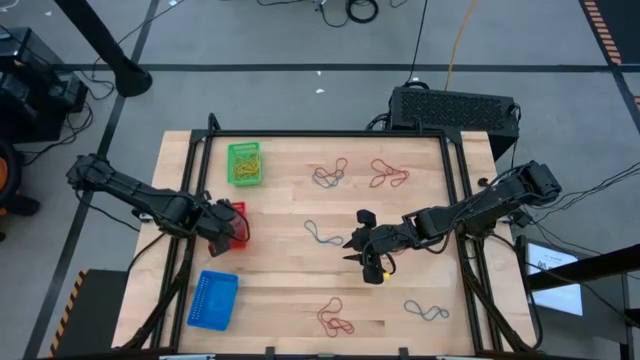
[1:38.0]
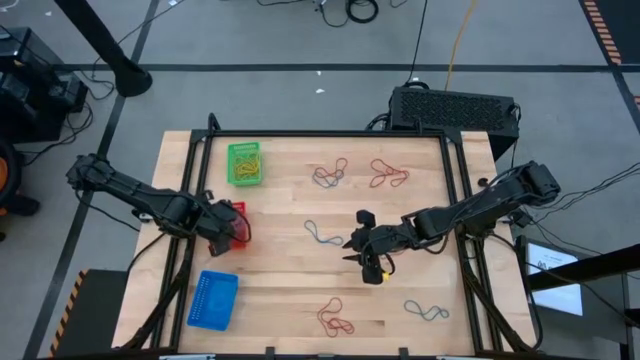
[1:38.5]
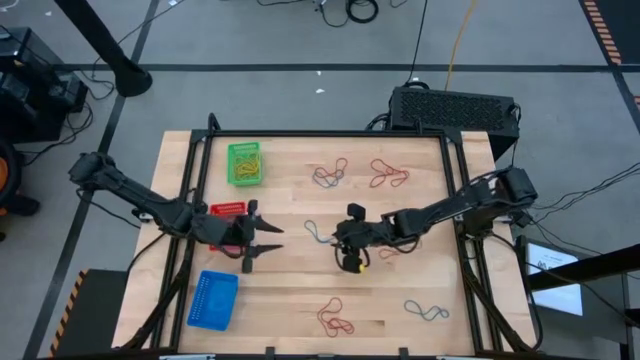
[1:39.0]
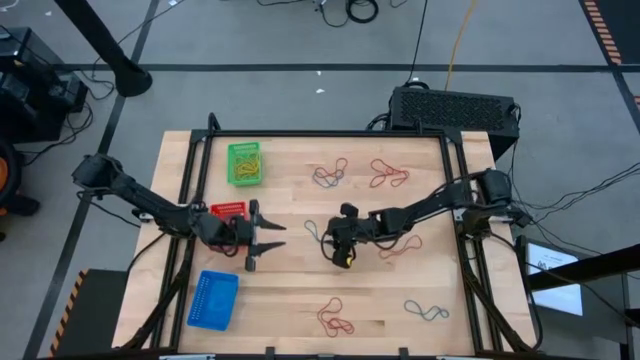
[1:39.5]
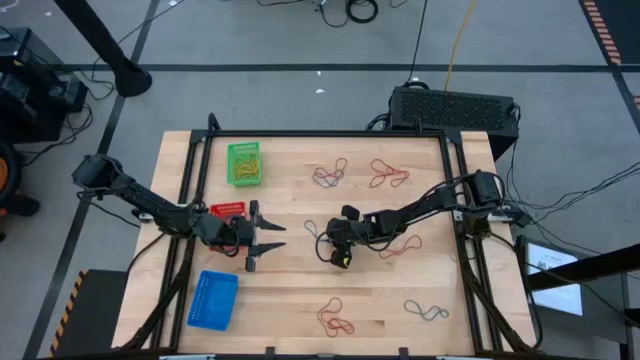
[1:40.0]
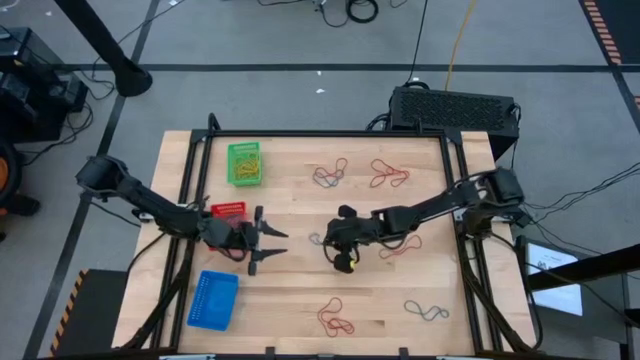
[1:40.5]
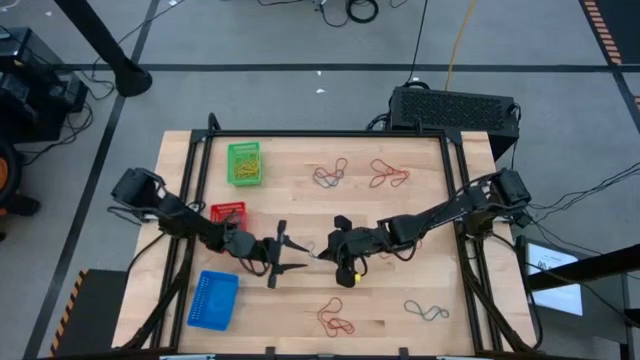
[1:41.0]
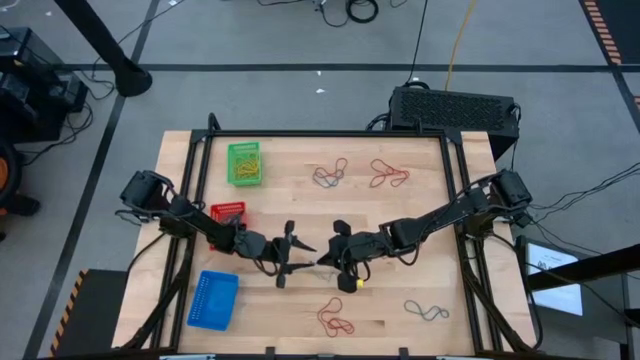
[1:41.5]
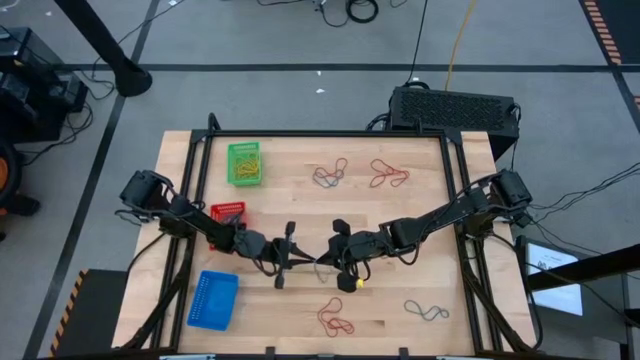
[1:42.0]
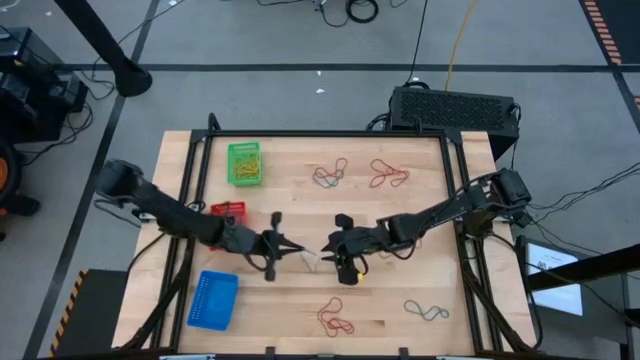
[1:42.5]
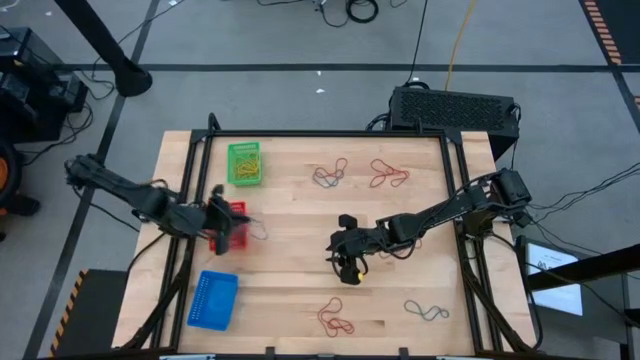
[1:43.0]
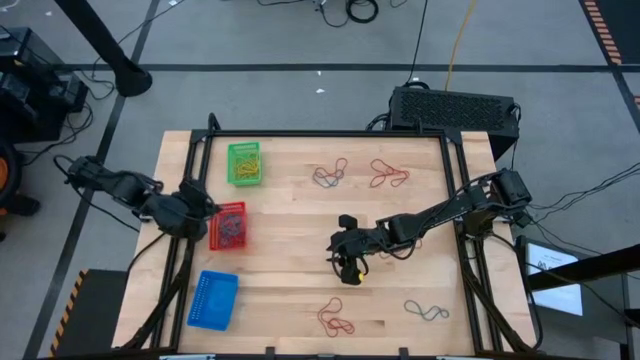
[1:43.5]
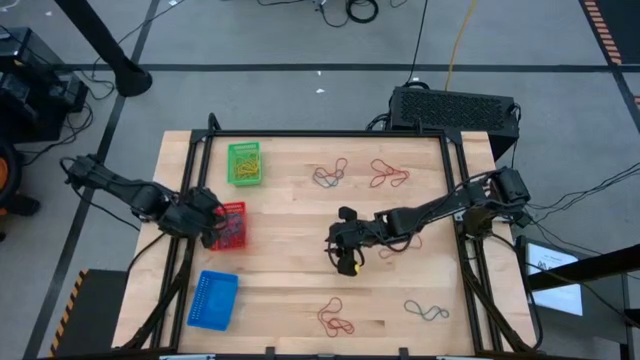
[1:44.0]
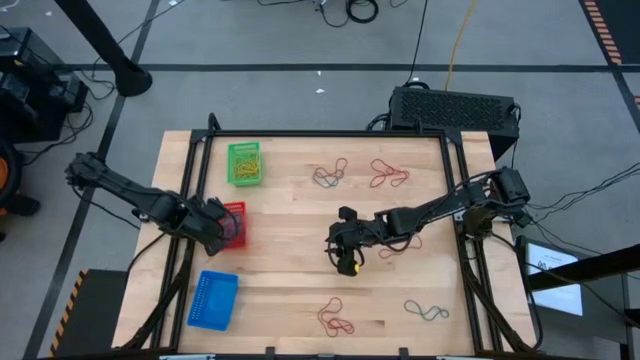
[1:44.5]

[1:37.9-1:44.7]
Task: Sort rubber bands into baskets
Put the blue rubber band into the red bin

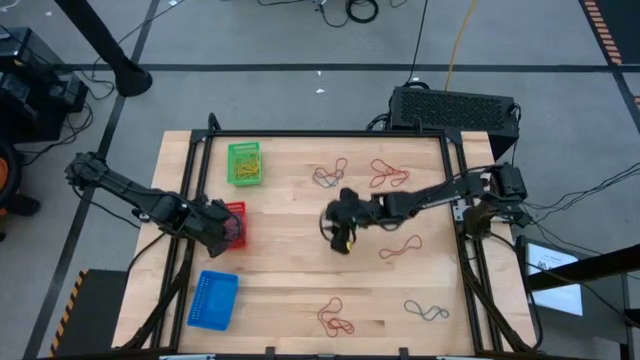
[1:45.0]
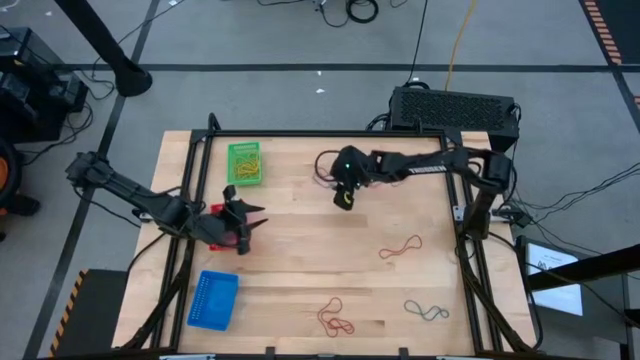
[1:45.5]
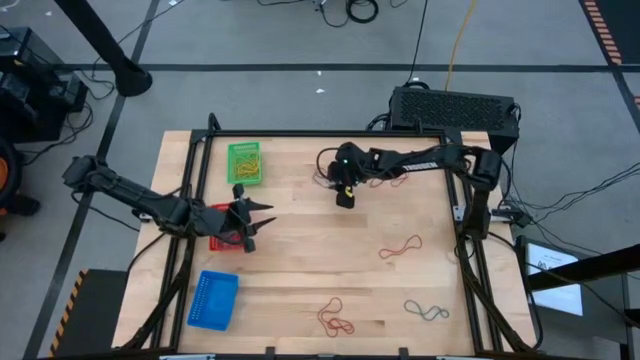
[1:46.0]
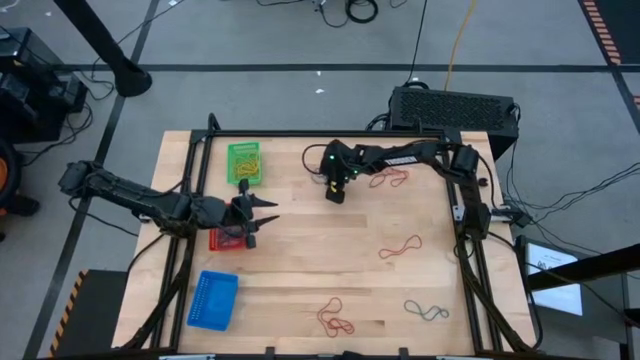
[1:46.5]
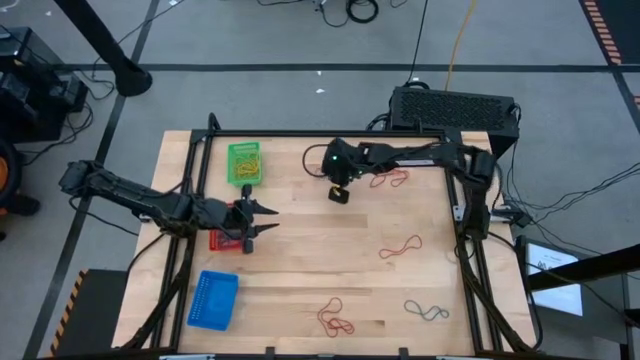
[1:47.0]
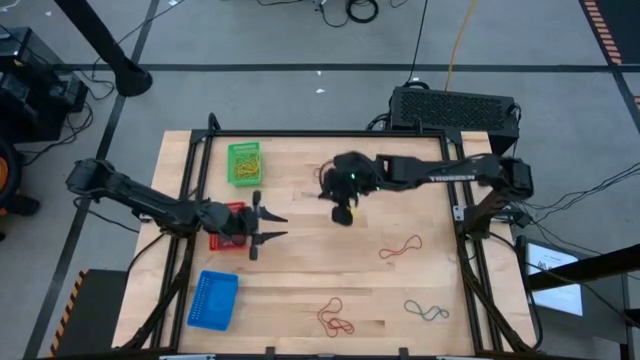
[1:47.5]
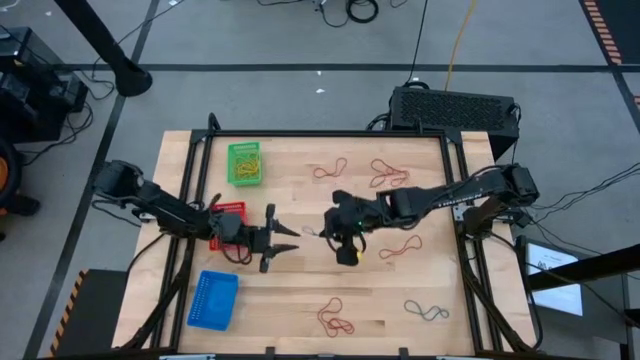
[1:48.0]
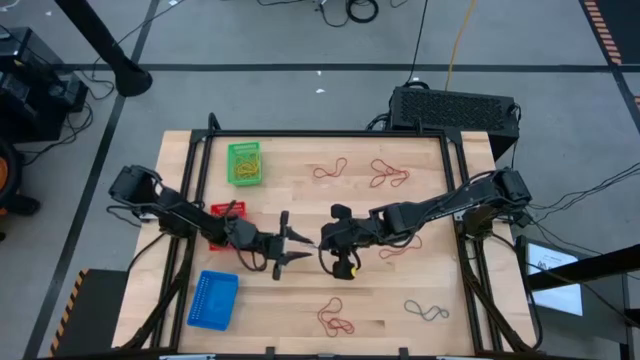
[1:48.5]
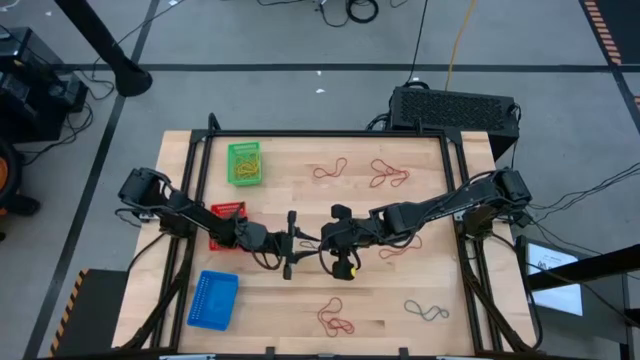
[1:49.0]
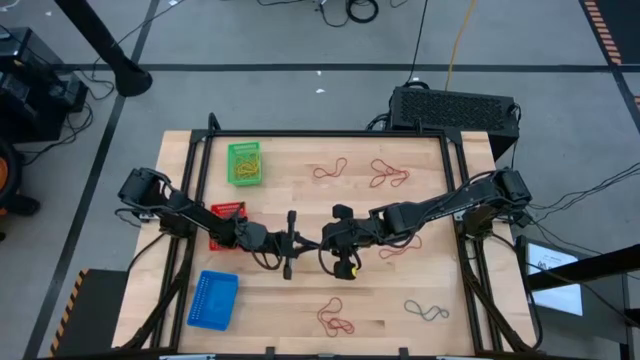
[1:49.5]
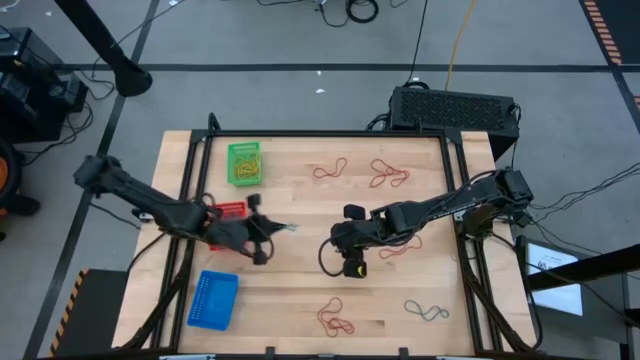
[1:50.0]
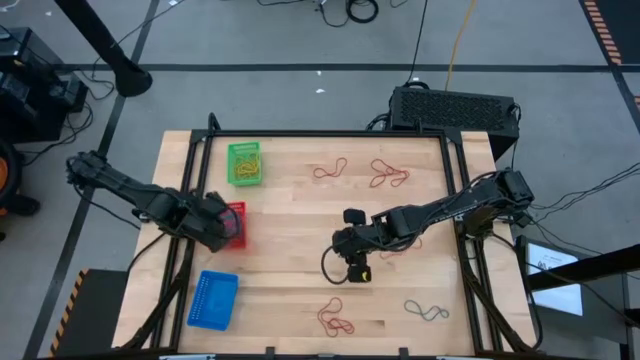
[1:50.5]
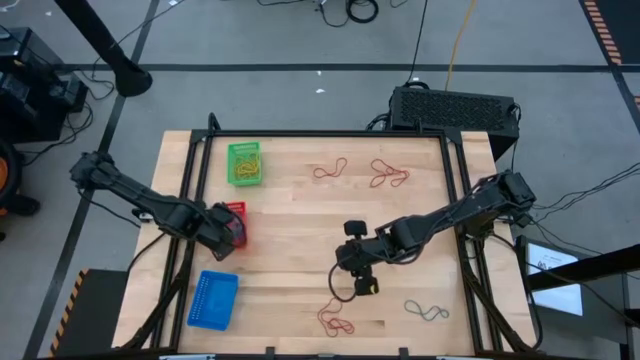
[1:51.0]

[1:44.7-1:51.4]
Put the blue rubber band into the red bin

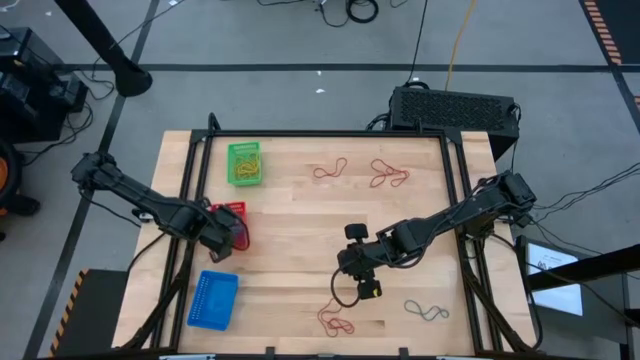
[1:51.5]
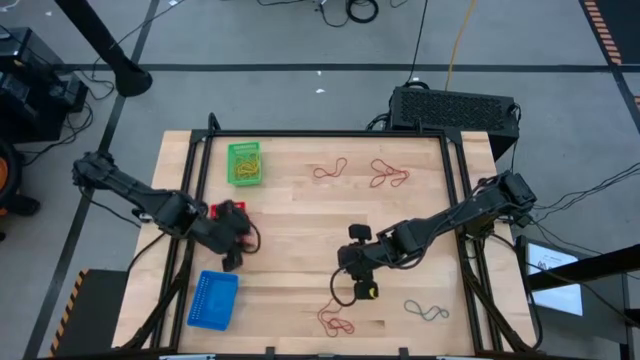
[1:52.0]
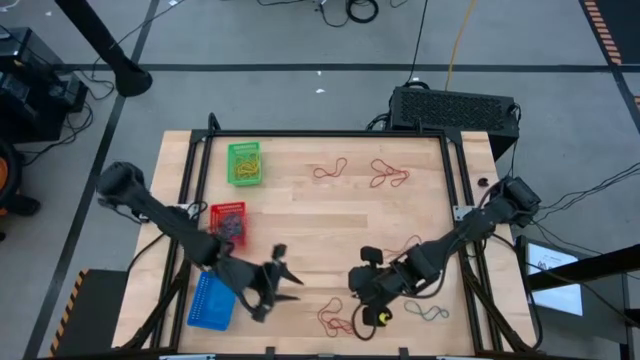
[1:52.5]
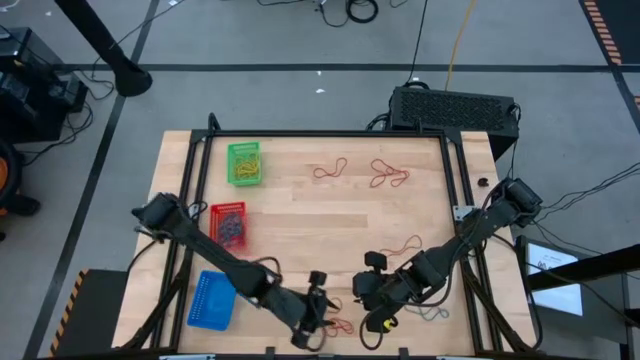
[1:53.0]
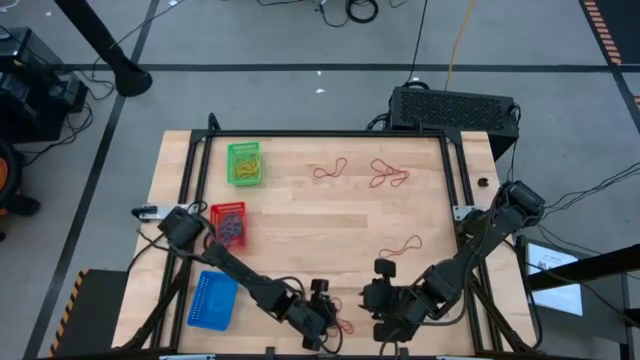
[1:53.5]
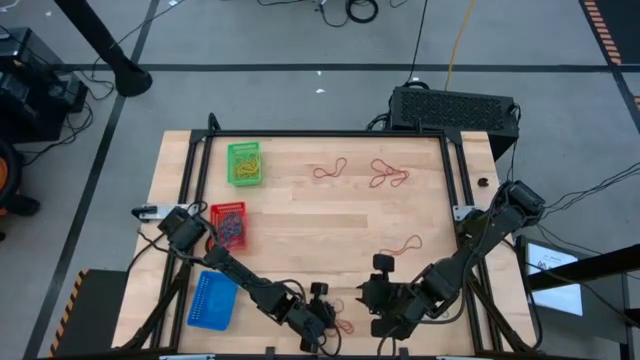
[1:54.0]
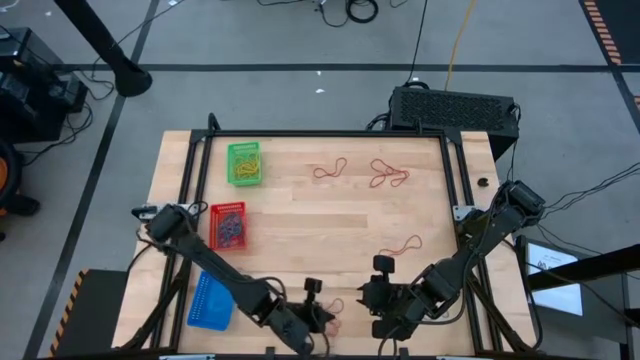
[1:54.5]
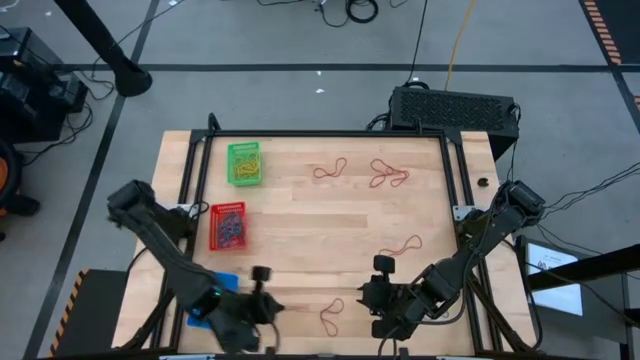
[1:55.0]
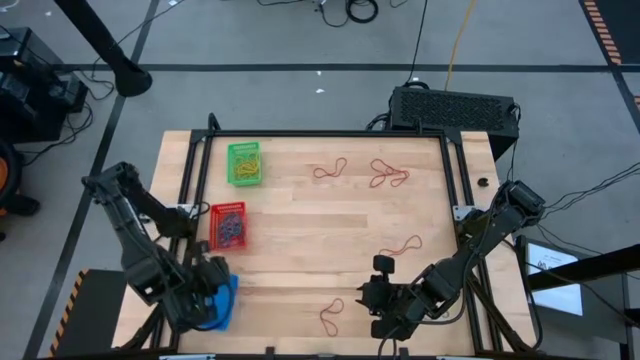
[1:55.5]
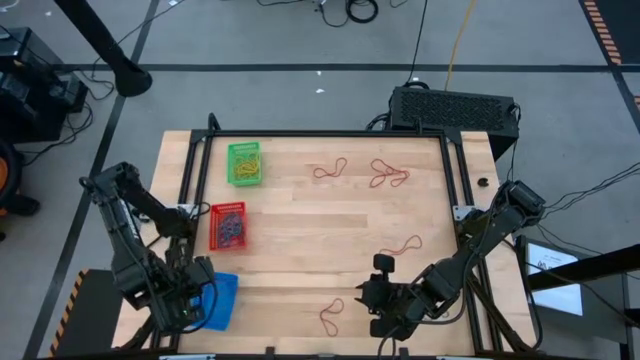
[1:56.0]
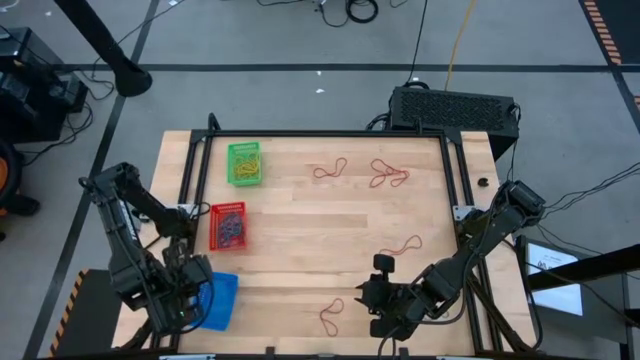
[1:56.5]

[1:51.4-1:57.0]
Put the red rubber band into the blue bin

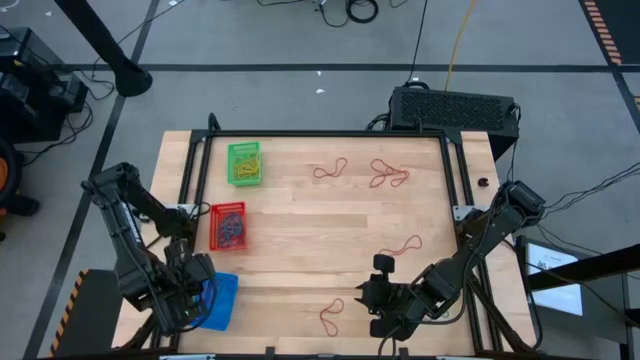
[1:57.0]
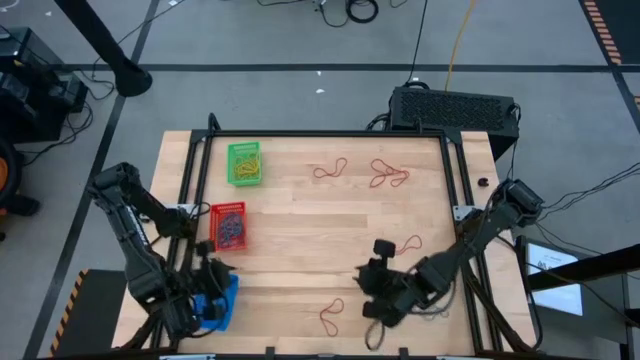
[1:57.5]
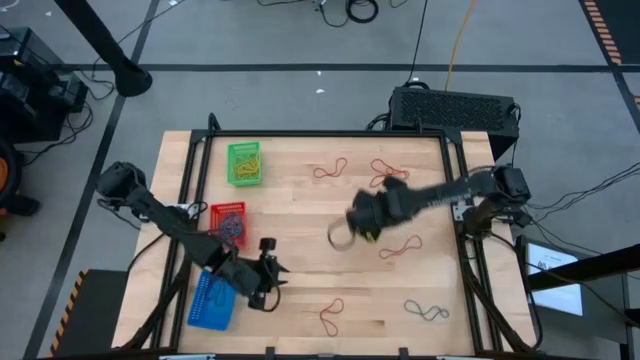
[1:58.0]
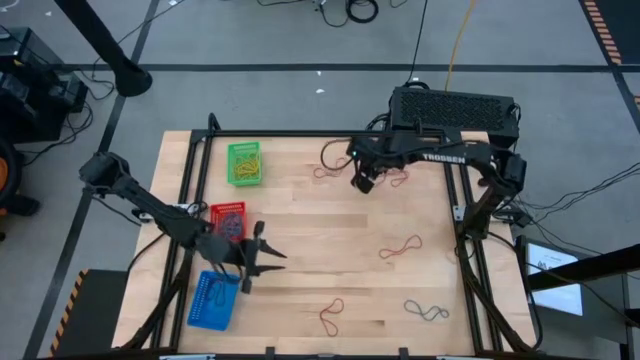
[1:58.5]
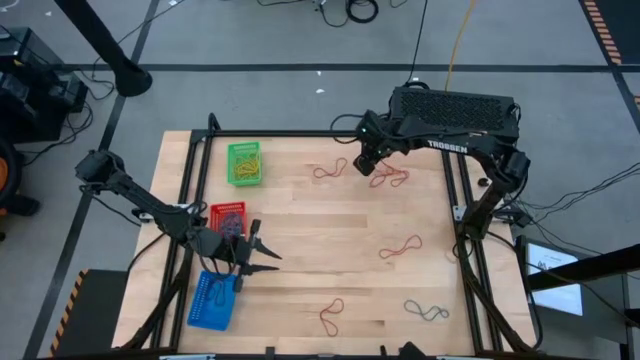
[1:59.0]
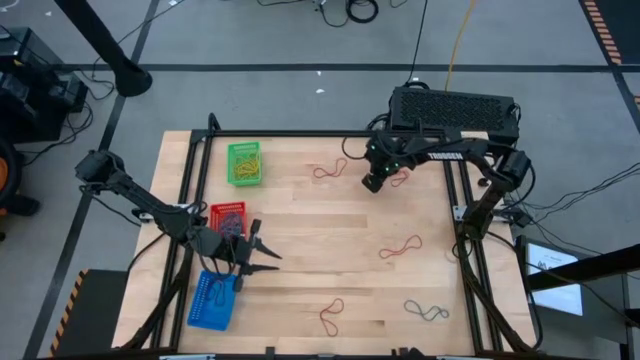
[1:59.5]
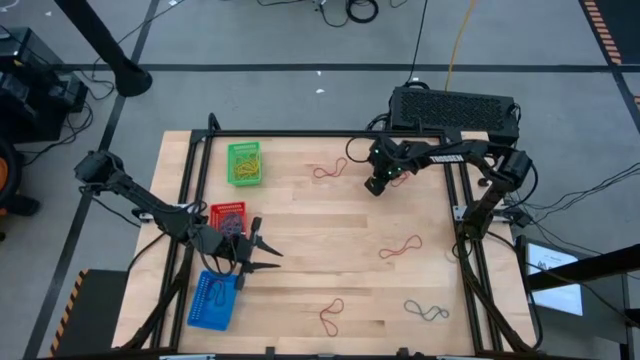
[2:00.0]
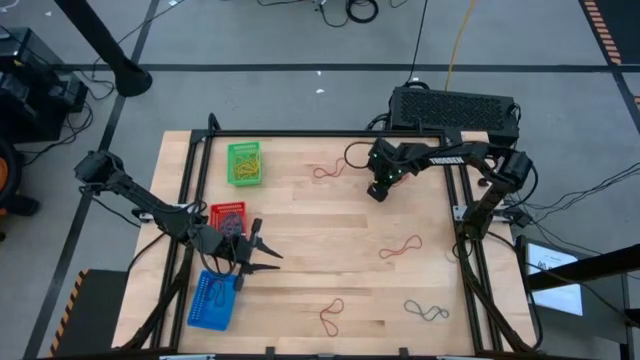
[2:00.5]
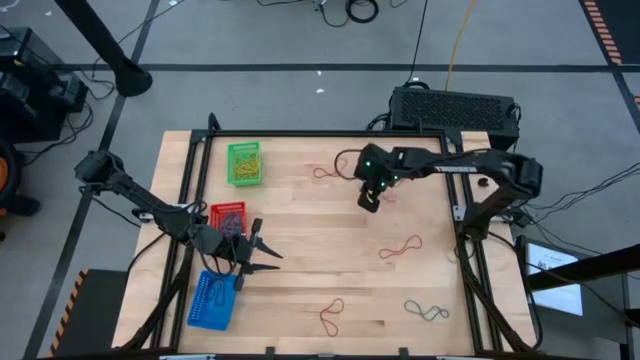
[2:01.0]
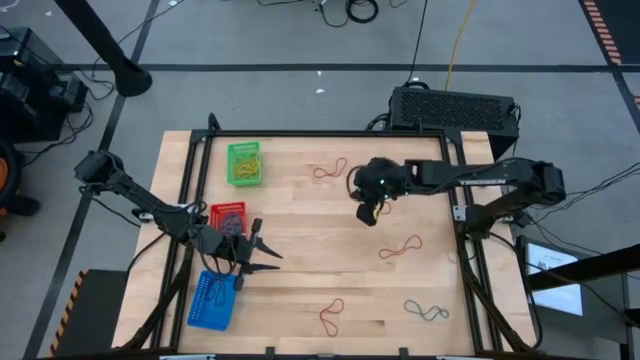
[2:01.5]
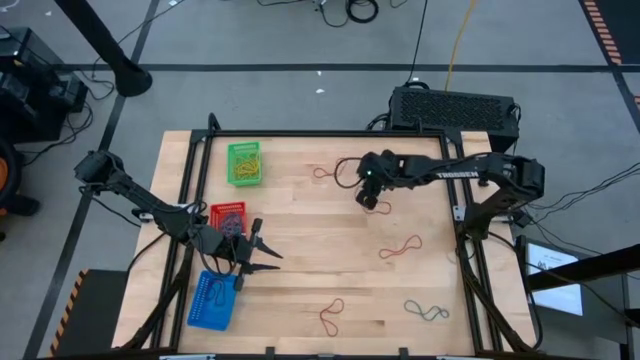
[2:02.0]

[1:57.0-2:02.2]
Put the red rubber band into the blue bin
